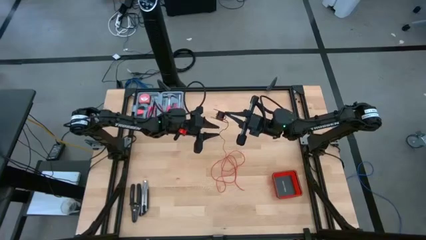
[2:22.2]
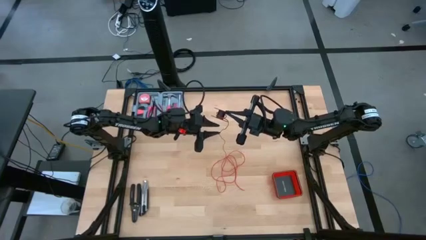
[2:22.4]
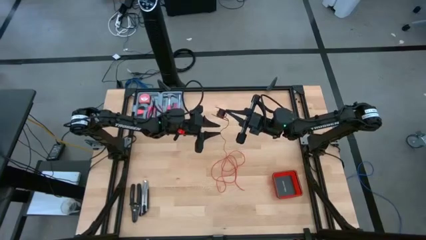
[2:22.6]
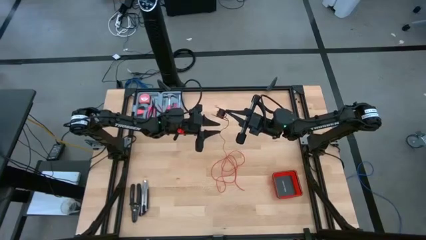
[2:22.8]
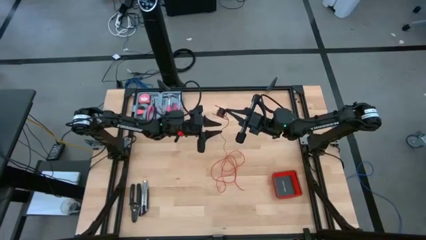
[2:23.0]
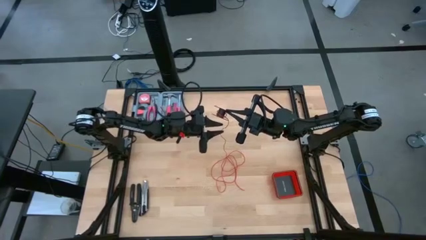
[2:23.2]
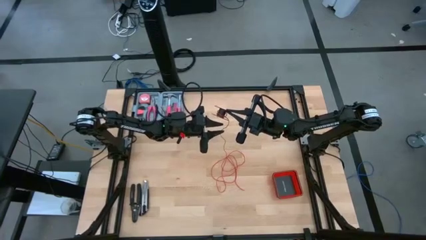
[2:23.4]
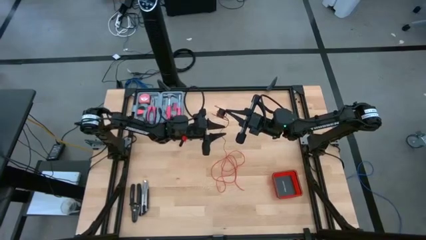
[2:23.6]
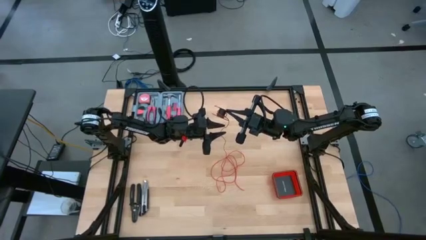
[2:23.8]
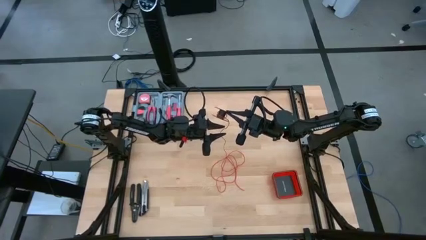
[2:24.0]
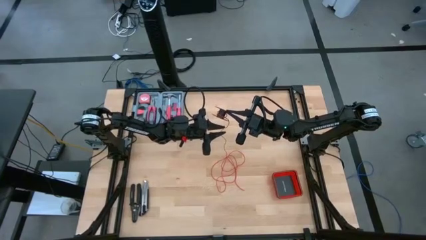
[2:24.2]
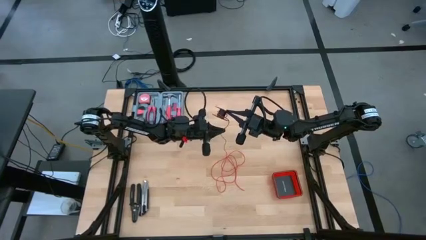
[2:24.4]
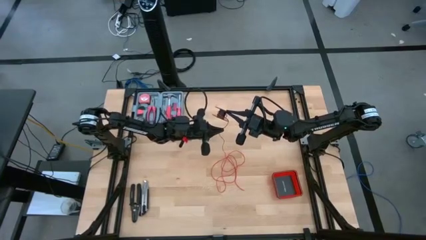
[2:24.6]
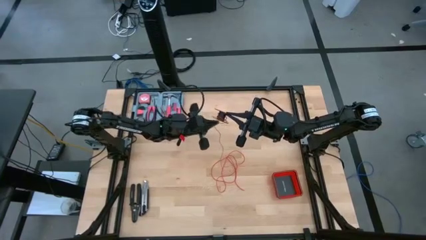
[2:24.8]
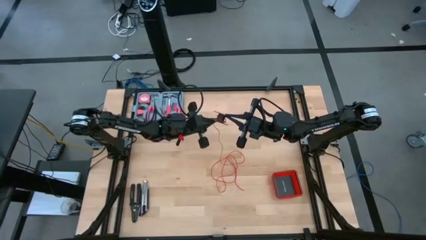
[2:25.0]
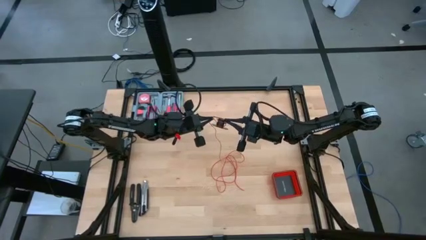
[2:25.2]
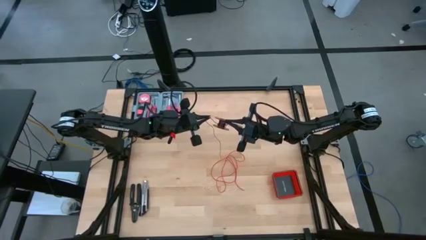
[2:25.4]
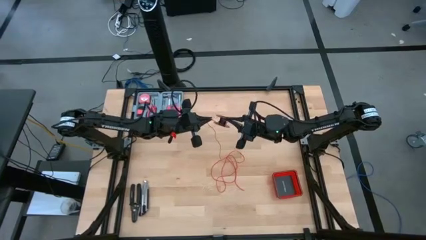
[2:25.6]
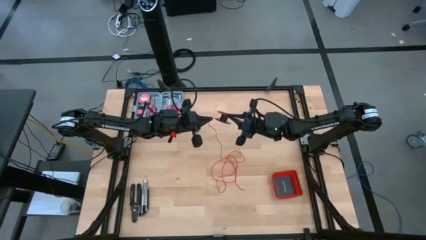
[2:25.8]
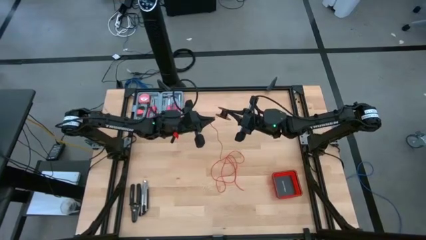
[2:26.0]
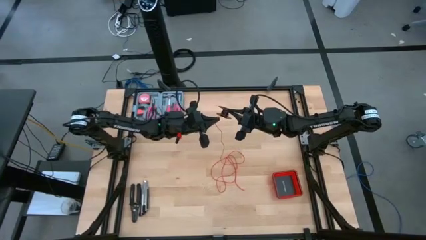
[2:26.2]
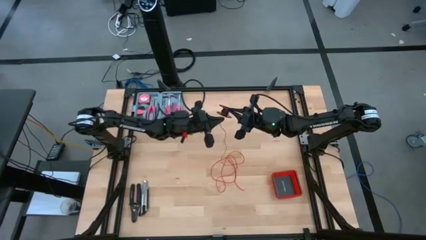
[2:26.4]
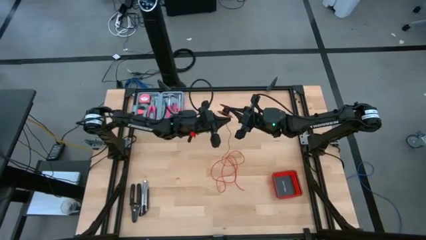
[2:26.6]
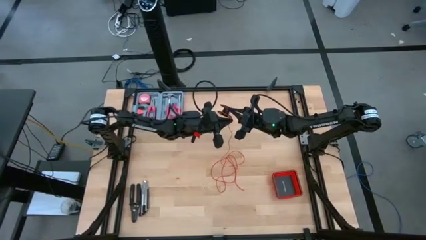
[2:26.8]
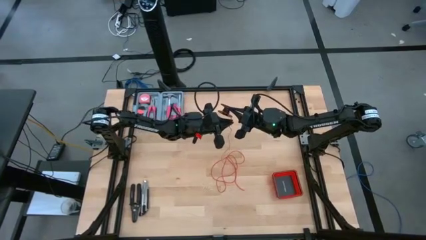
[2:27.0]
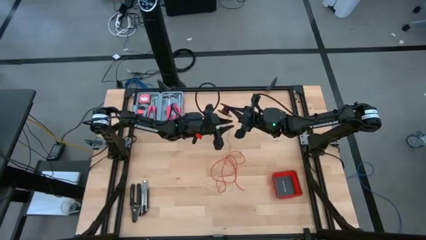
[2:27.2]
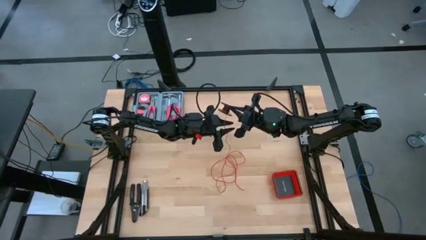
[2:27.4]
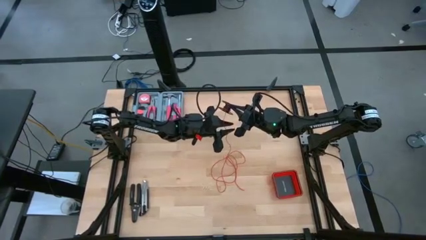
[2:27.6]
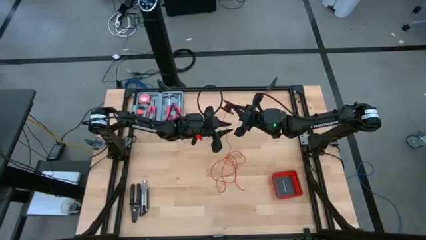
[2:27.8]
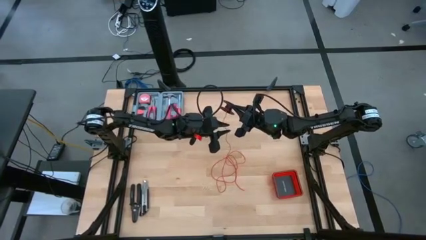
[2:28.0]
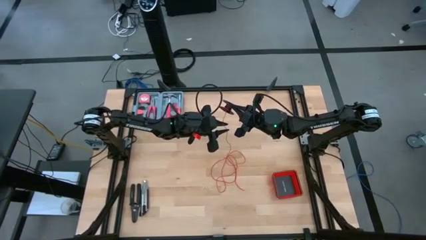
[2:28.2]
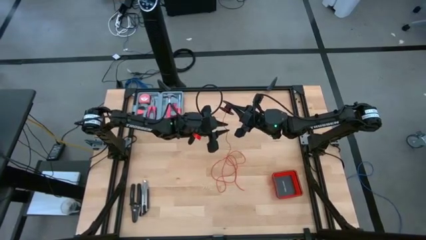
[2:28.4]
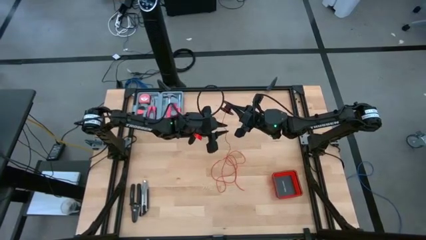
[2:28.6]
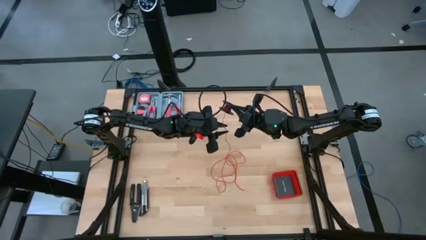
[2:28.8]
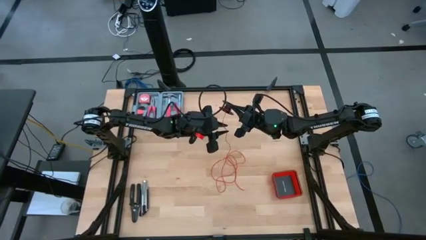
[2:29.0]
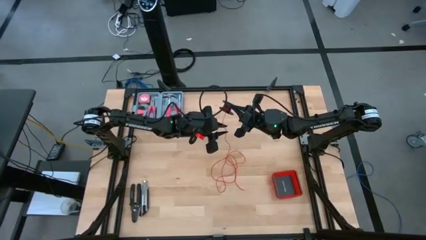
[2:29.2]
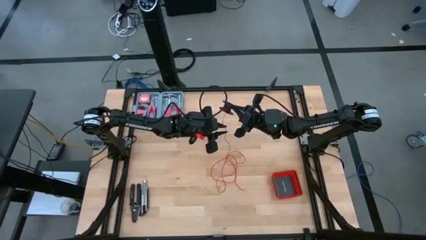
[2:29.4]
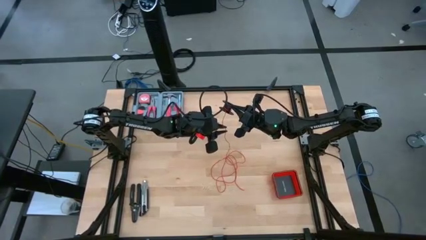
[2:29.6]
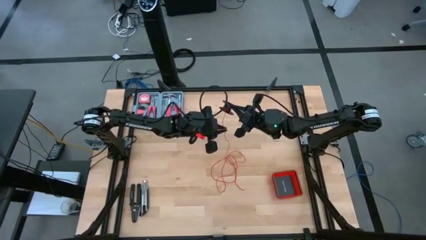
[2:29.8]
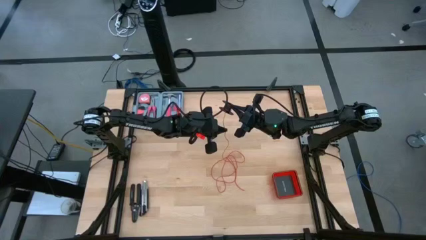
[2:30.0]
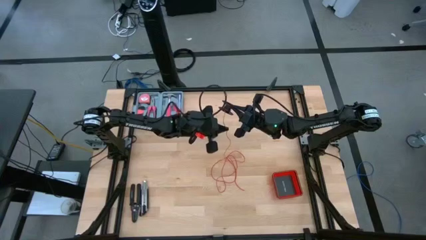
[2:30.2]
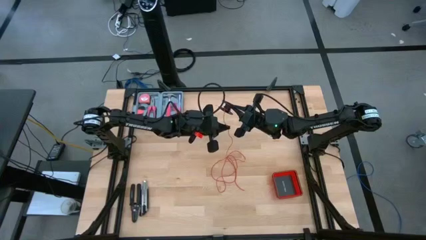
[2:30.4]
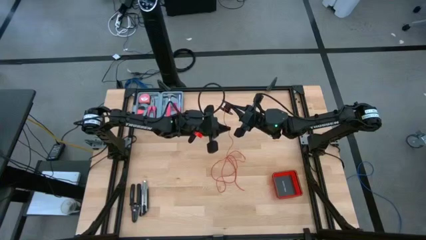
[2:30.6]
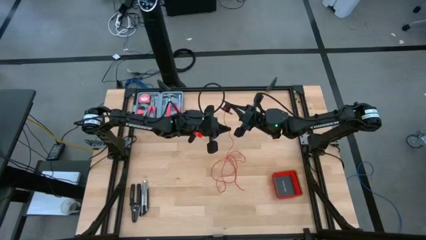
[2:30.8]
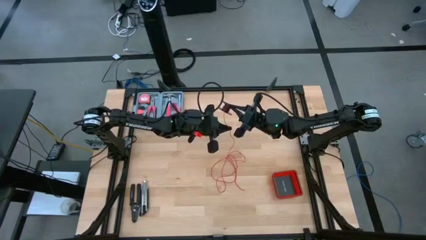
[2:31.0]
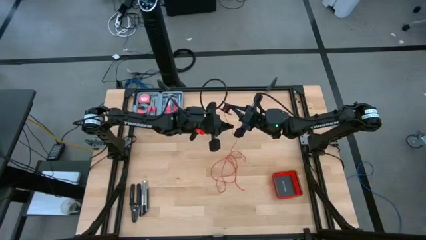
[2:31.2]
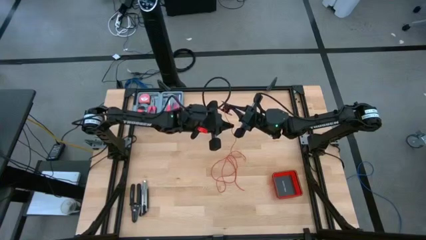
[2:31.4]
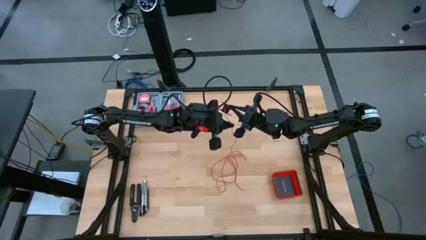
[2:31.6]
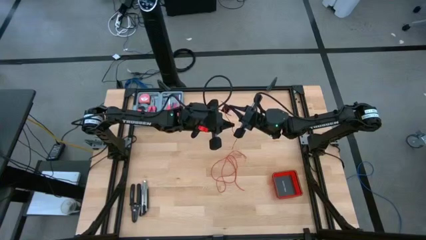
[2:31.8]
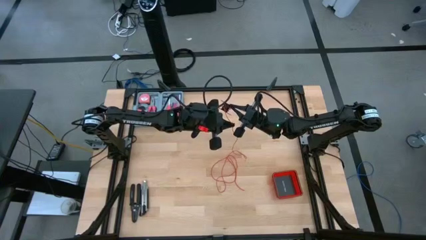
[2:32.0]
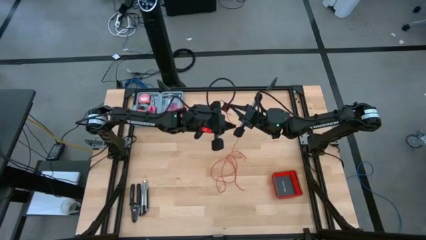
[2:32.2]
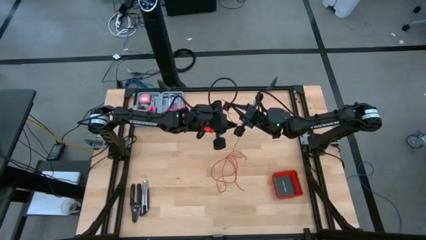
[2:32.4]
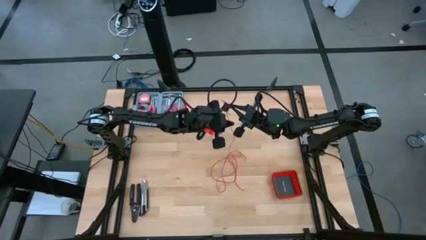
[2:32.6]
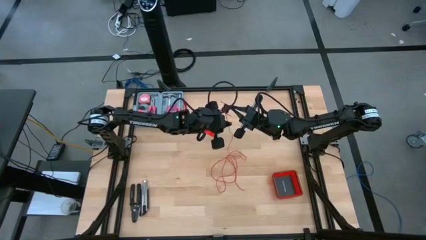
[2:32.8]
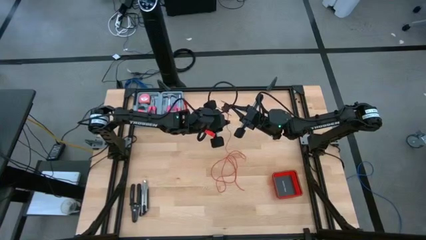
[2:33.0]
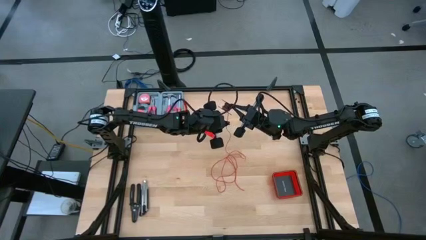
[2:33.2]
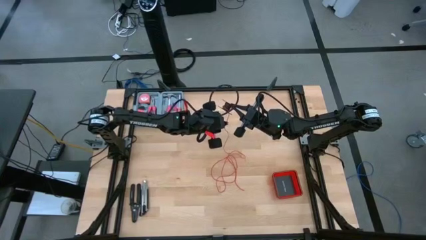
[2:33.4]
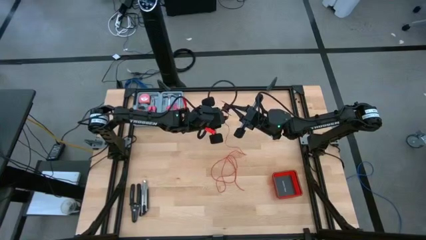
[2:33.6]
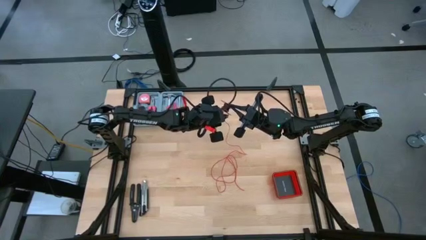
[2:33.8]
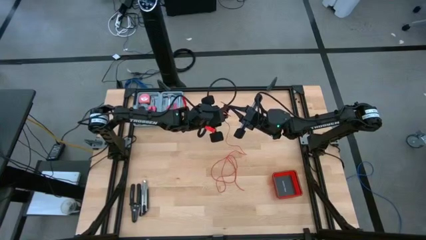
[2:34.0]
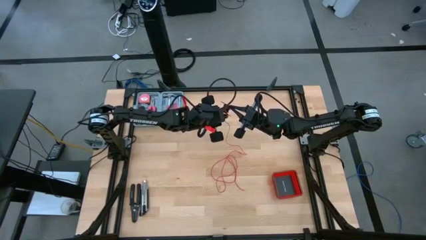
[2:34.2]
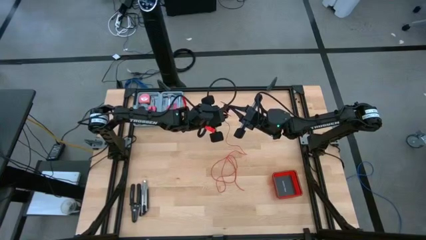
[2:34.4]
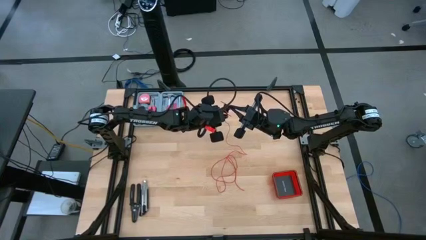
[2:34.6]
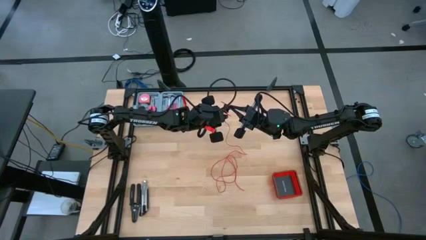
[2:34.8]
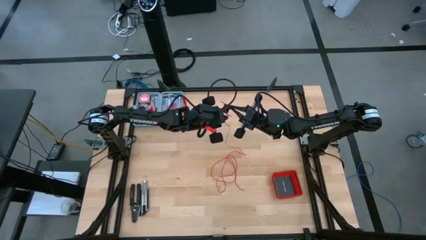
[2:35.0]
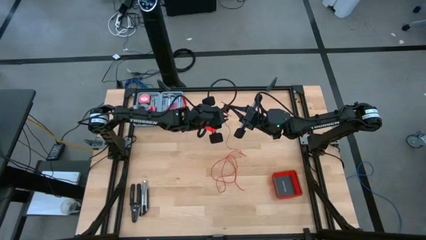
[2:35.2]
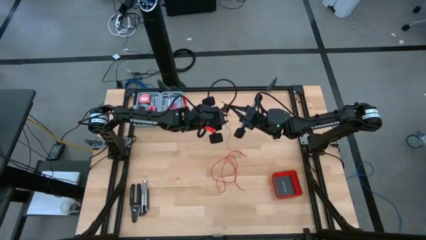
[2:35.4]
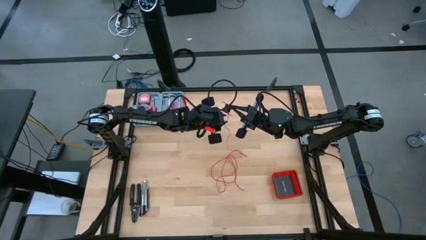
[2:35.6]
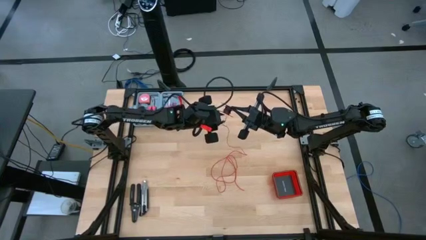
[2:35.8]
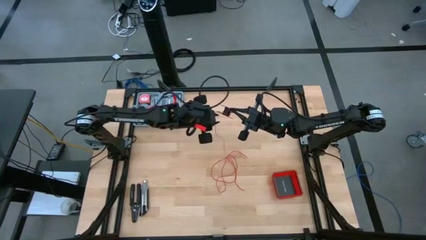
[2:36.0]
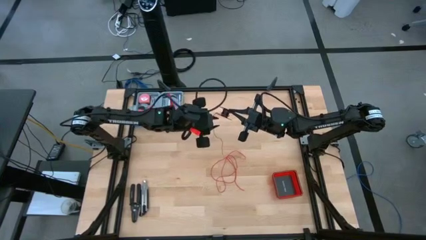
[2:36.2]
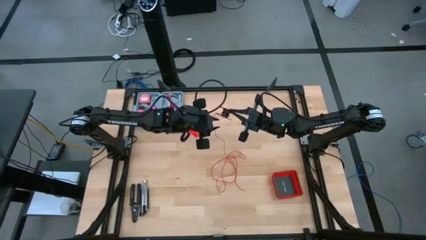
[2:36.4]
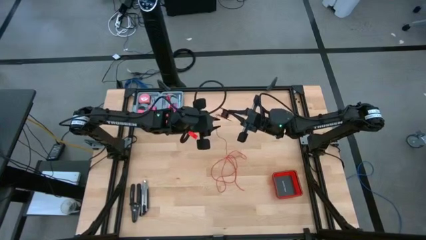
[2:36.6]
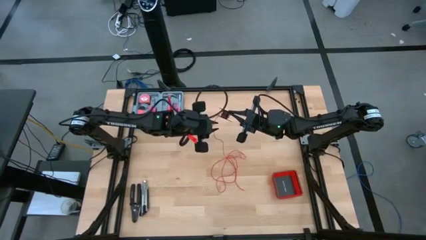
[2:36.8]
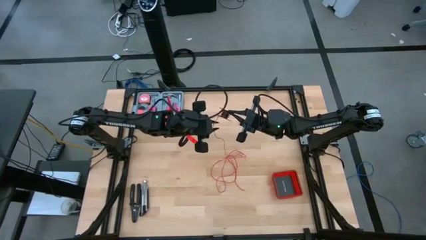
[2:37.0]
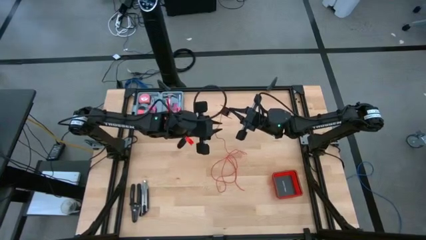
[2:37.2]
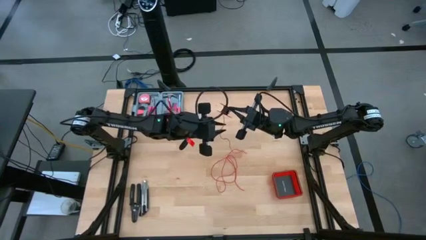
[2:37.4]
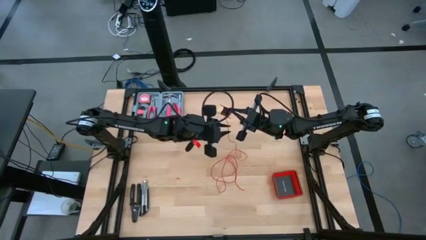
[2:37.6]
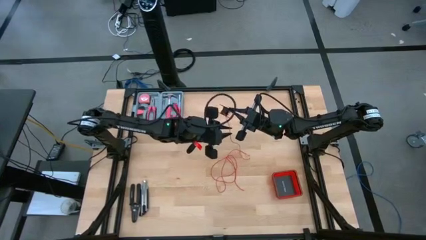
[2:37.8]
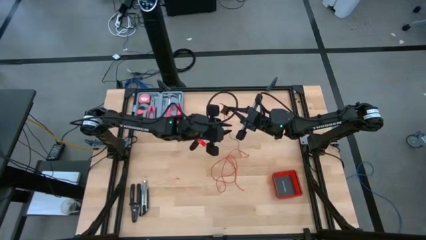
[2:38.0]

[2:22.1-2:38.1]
Task: Coil cords
Coil the red wire onto the spool
